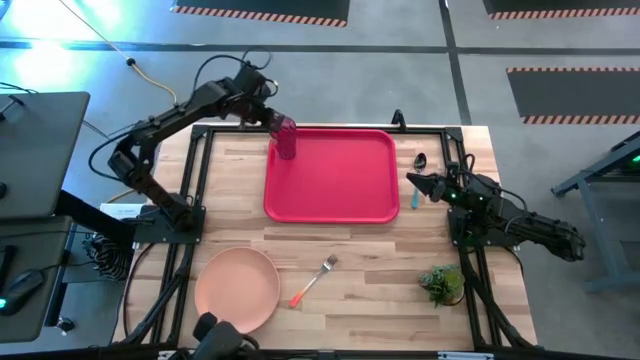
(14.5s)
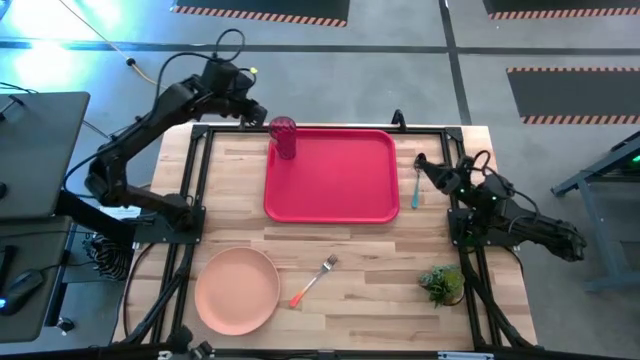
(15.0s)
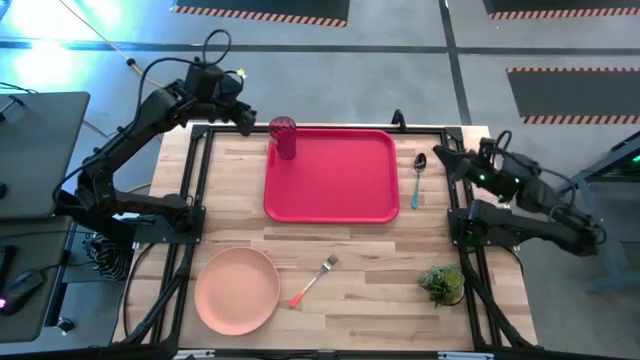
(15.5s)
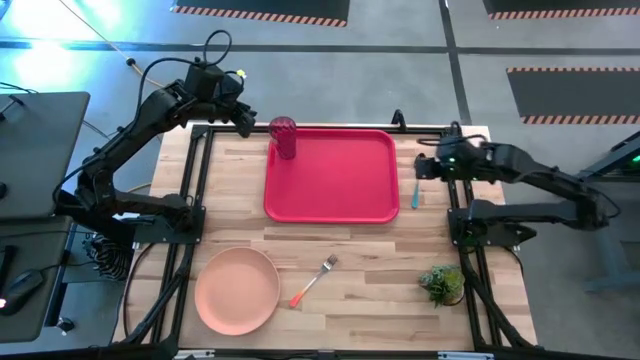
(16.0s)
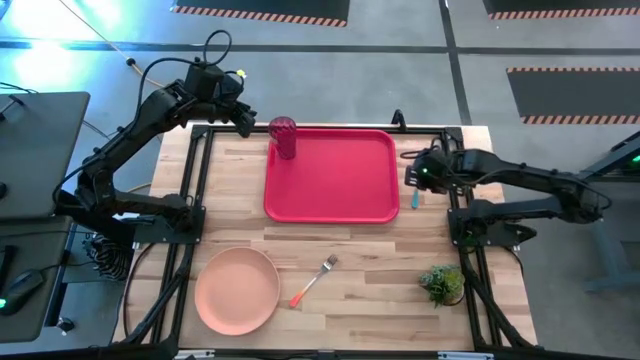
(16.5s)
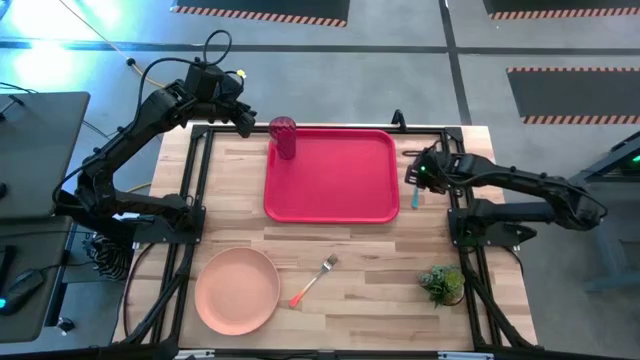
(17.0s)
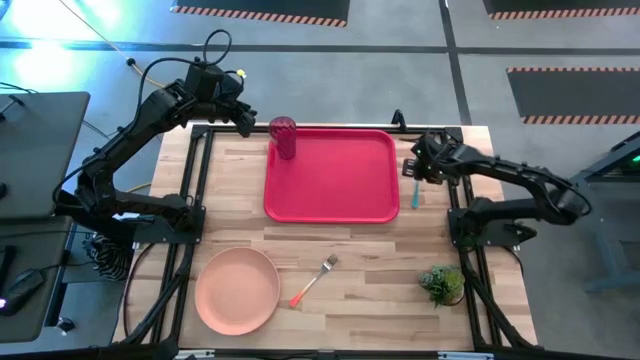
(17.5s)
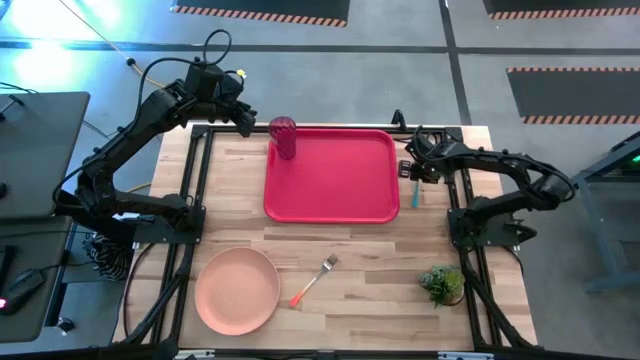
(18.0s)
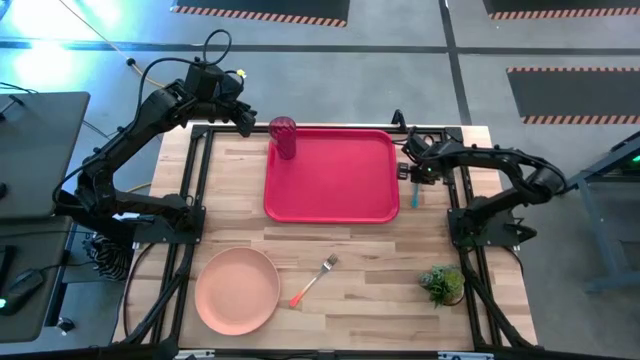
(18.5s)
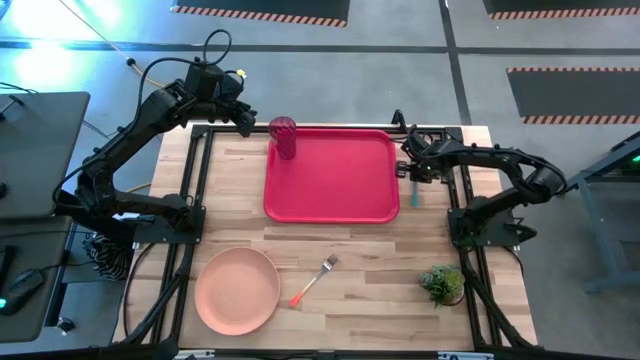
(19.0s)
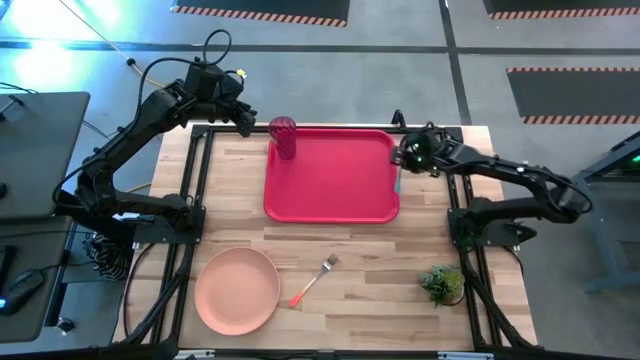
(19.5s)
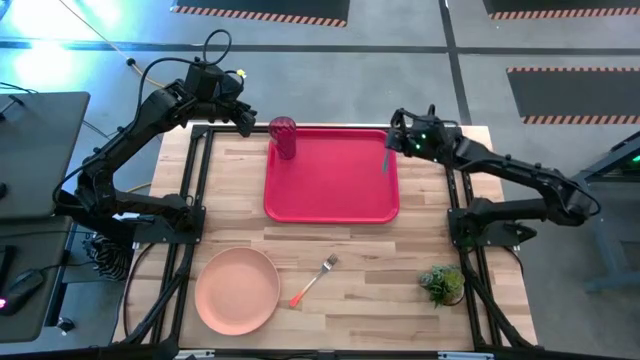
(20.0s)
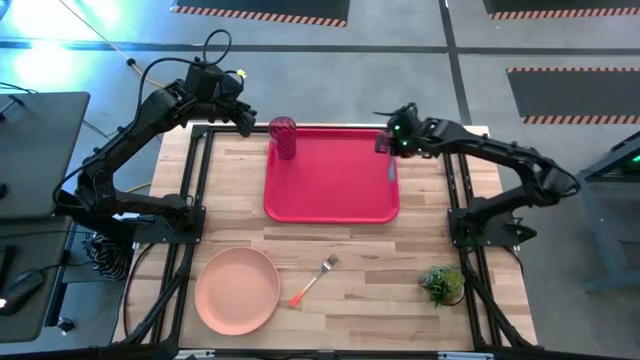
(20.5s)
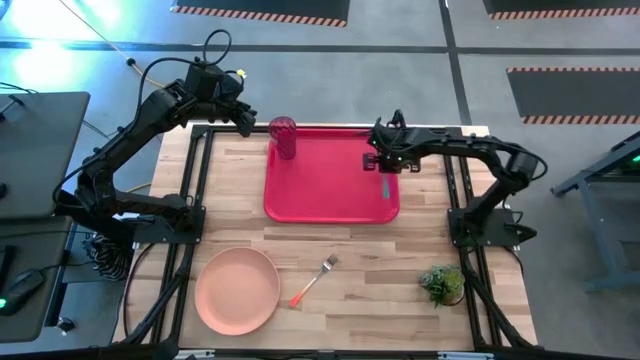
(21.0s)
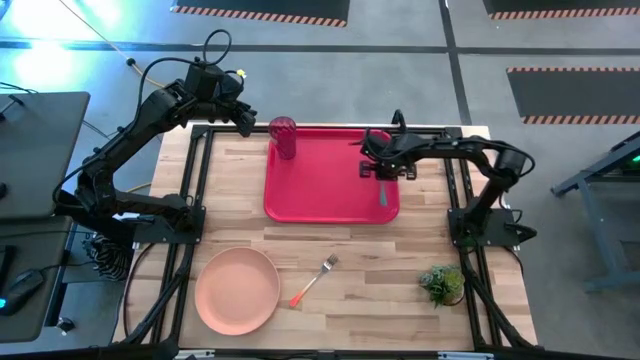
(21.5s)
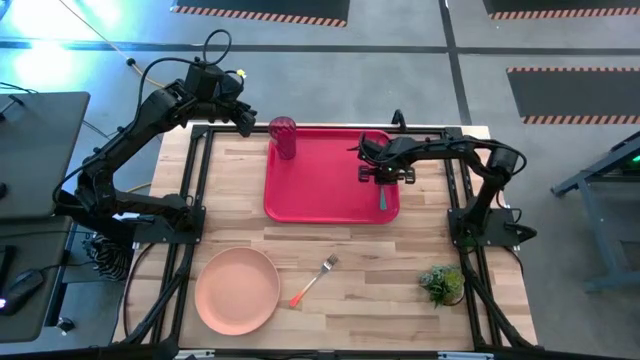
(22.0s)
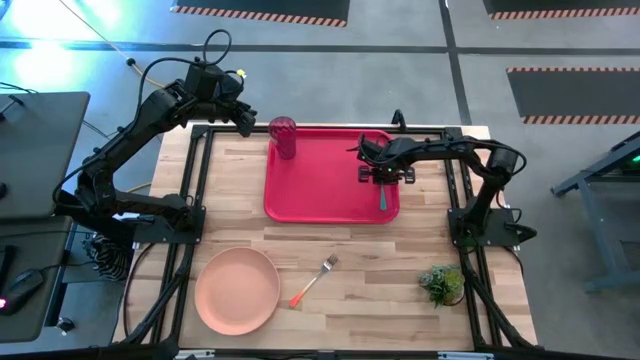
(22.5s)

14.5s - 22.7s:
Task: Pick and place plate/cup/fork/spoon on tray
Put the blue spoon to the right side of the red serving tray

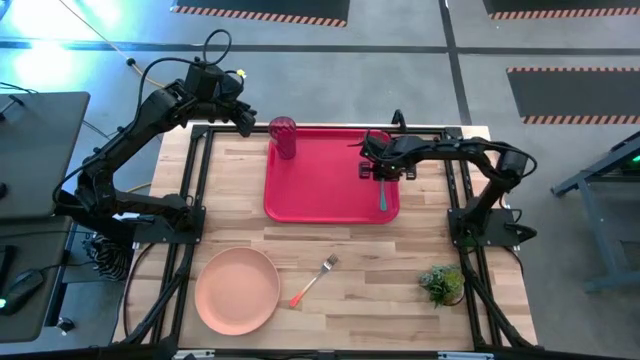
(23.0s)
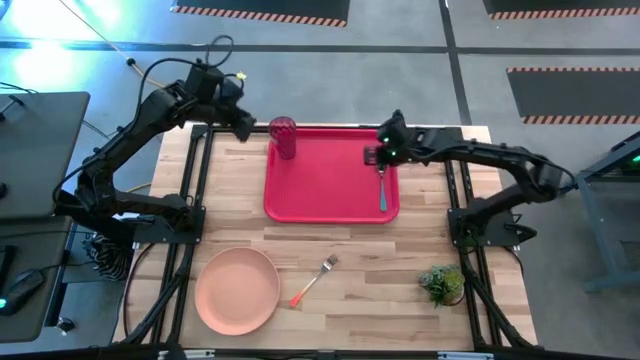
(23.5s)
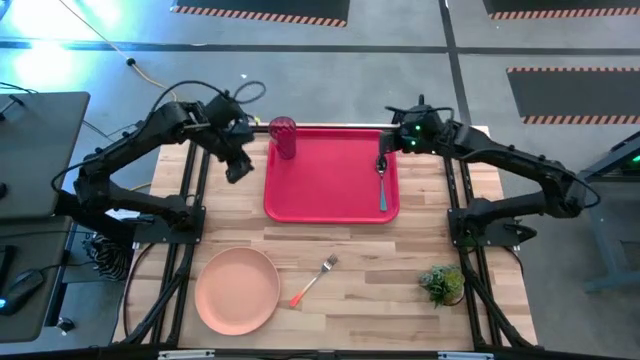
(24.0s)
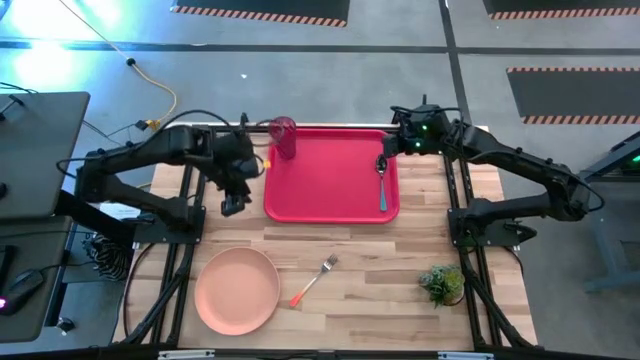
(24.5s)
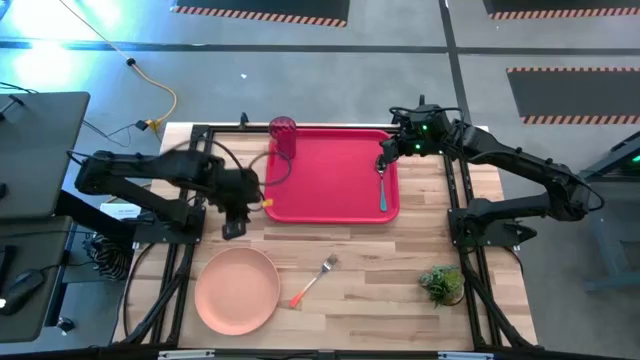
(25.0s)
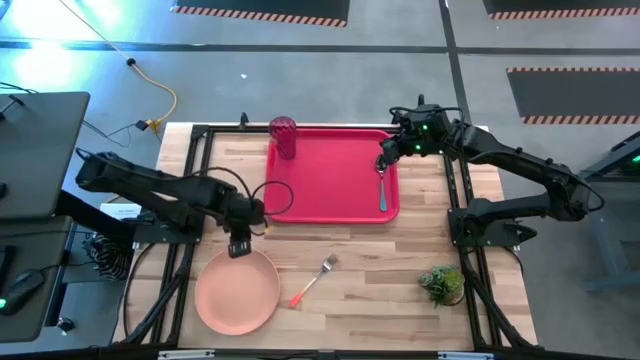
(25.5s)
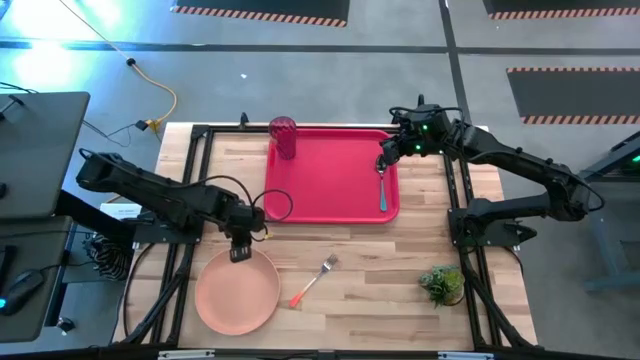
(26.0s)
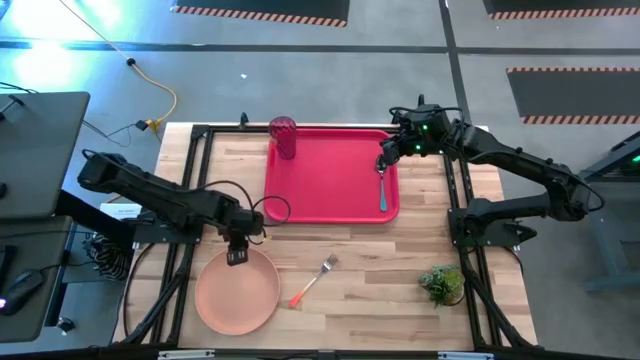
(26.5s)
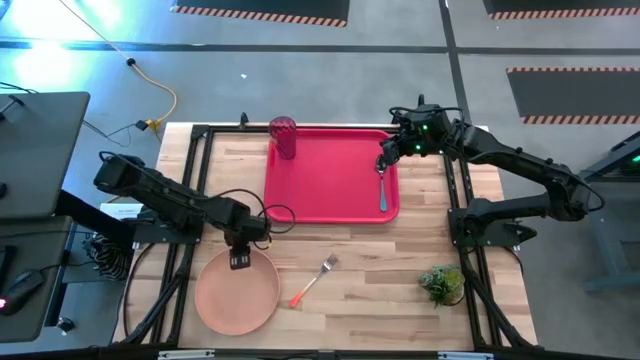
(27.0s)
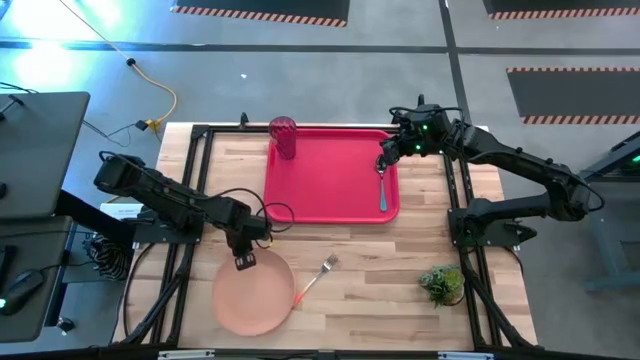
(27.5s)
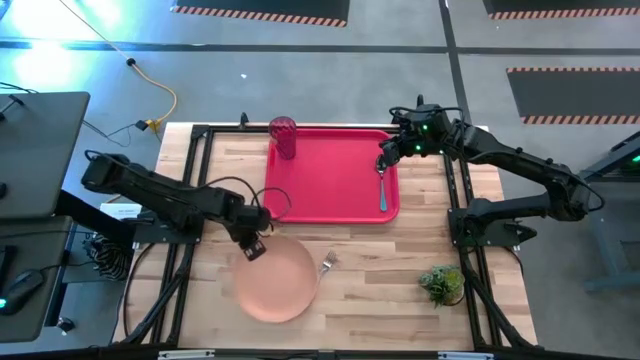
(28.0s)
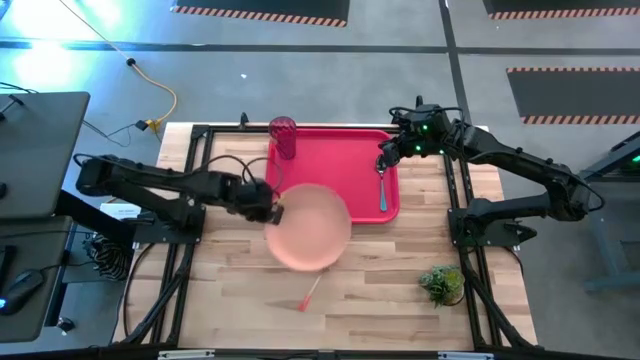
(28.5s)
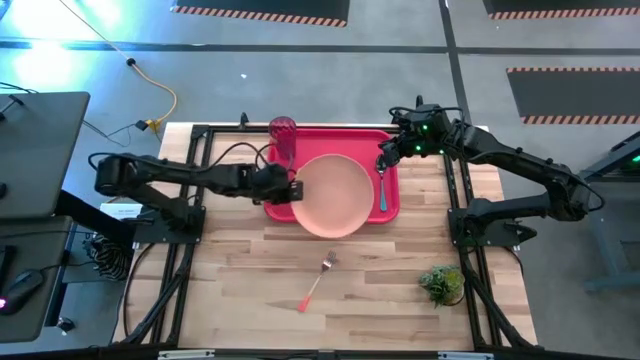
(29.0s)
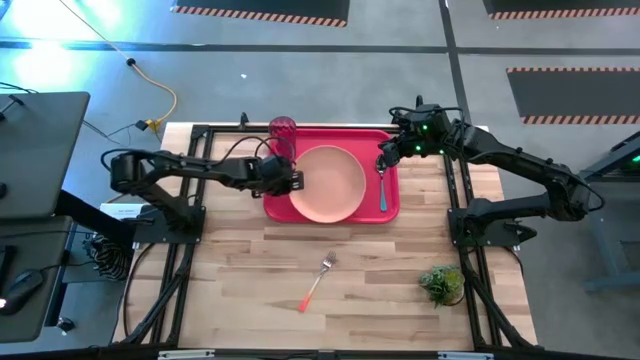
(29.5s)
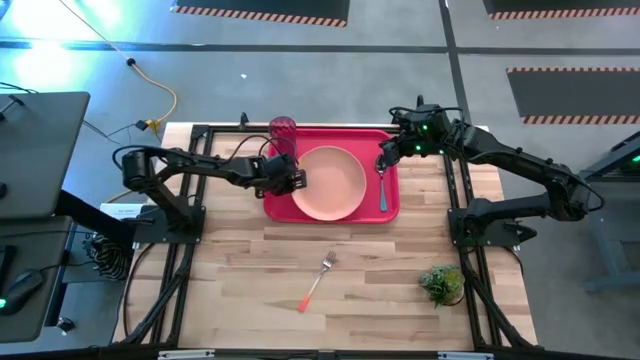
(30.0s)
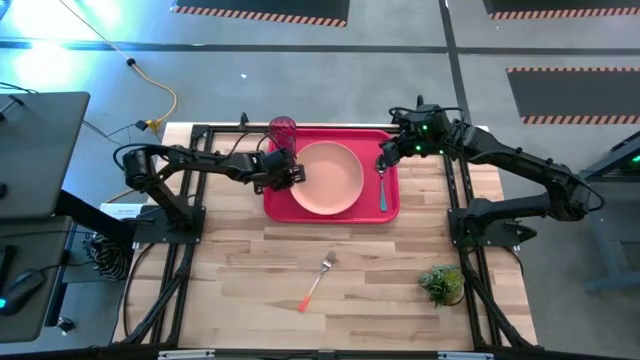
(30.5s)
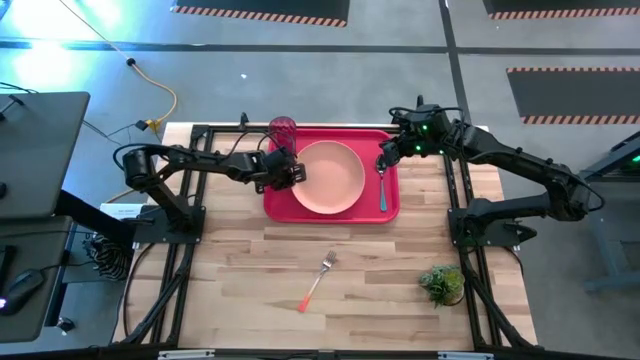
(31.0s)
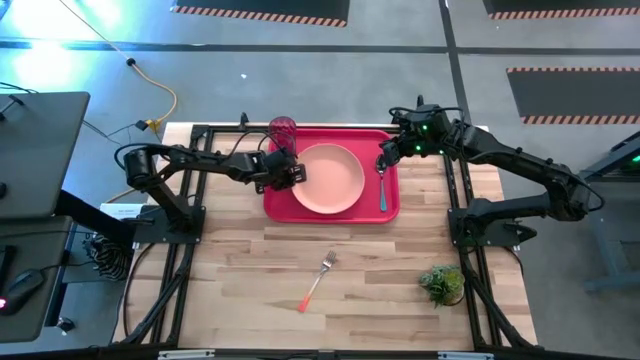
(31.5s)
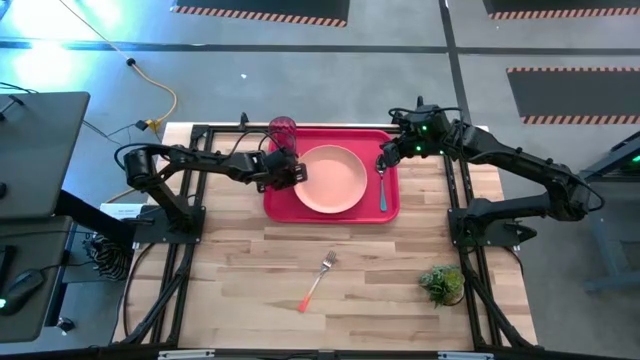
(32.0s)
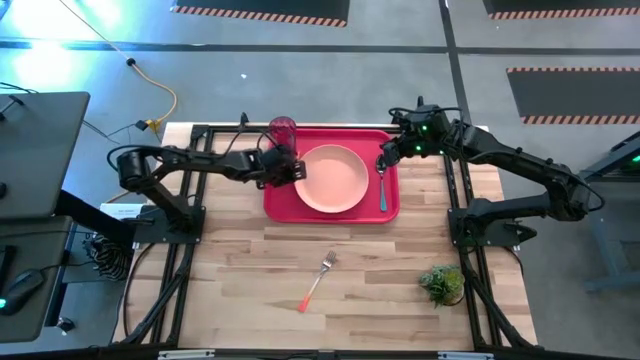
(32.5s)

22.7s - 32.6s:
Put the light orange plate to the middle of the red serving tray

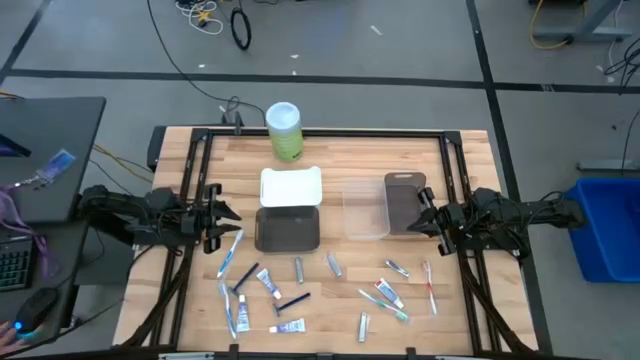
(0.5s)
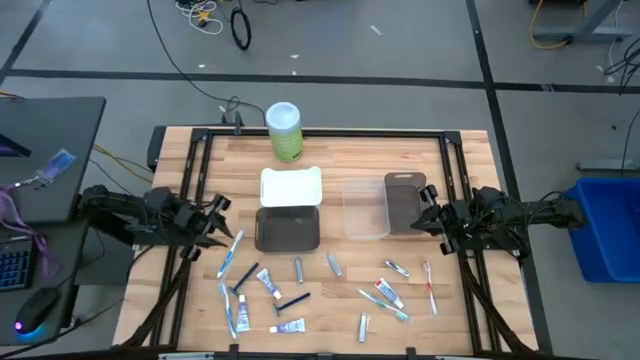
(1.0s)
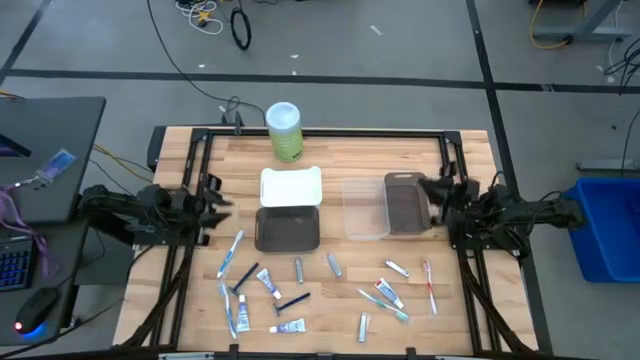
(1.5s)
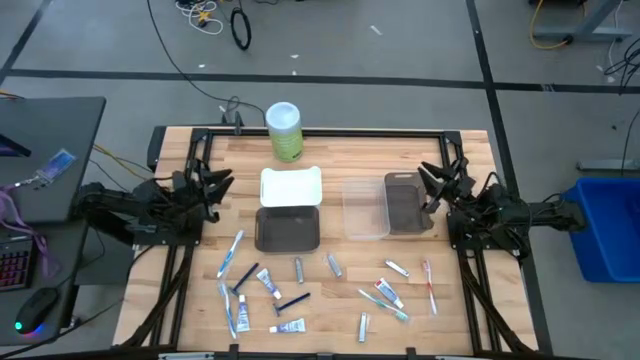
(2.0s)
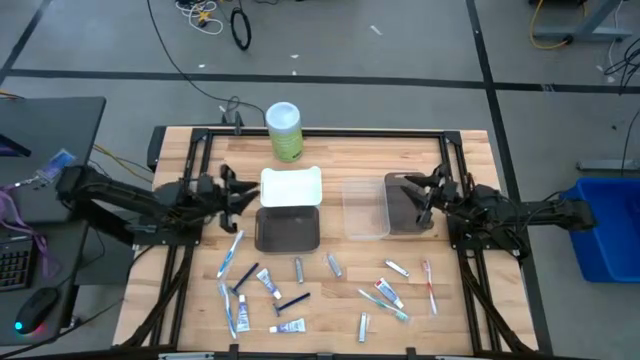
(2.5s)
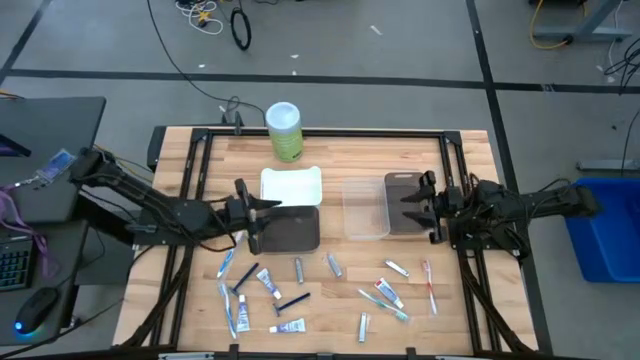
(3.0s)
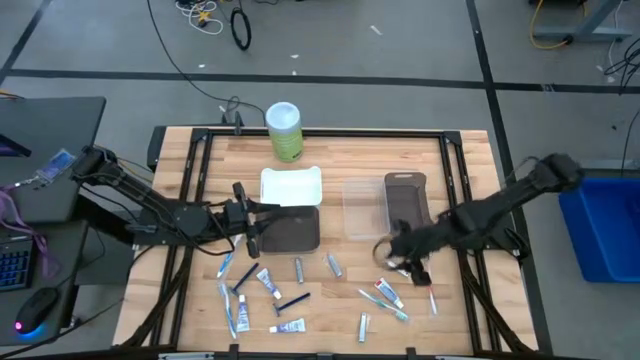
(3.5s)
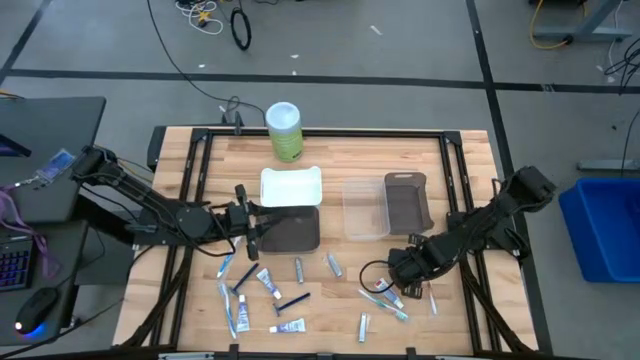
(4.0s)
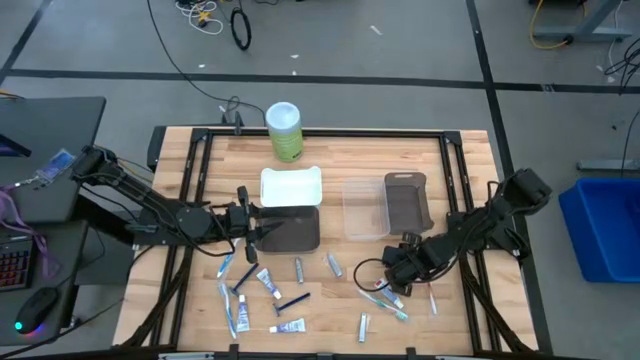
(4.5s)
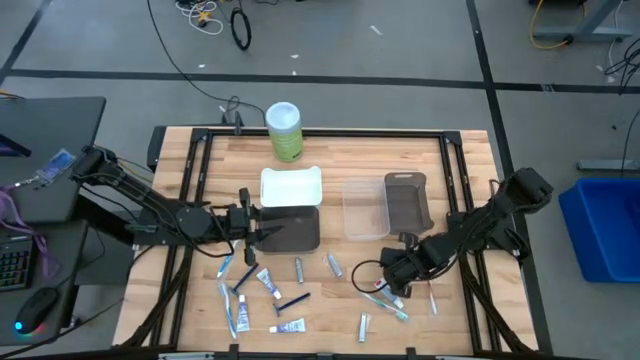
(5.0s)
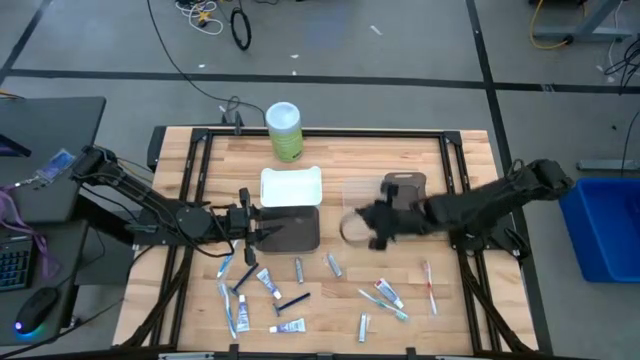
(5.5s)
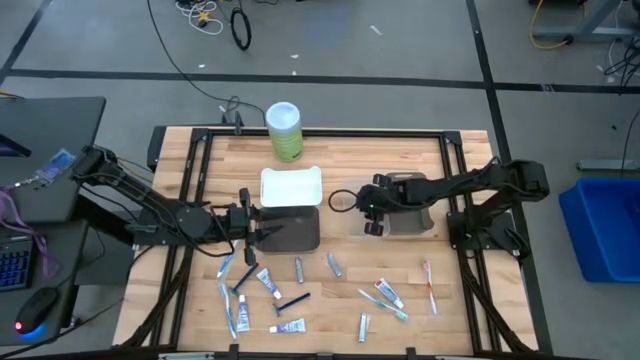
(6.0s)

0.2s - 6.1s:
Task: Pick & Place Travel size toiletries
Put the silver nail cutter into the transparent bin
